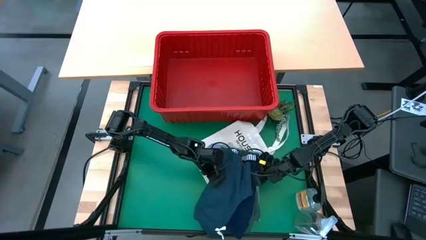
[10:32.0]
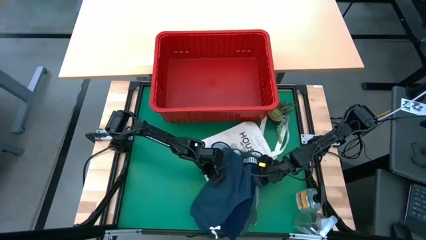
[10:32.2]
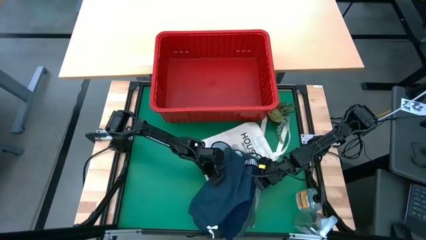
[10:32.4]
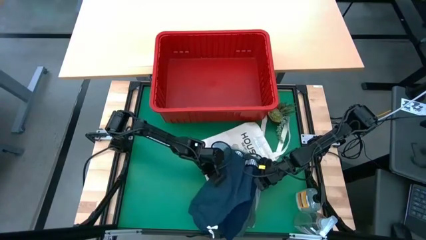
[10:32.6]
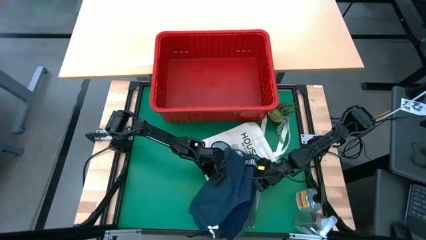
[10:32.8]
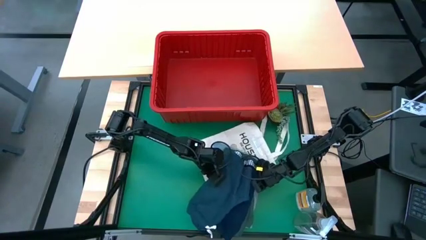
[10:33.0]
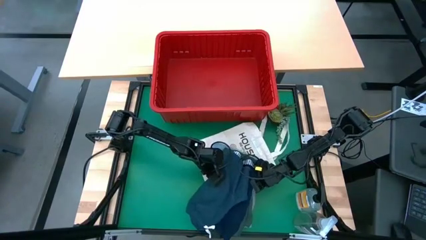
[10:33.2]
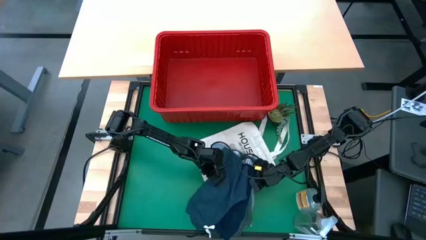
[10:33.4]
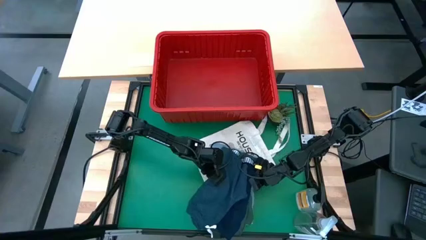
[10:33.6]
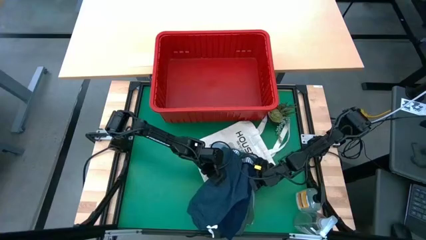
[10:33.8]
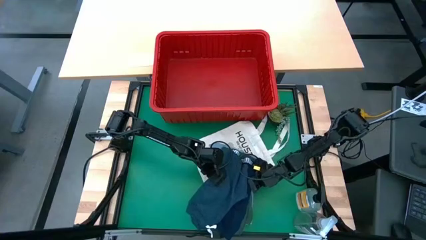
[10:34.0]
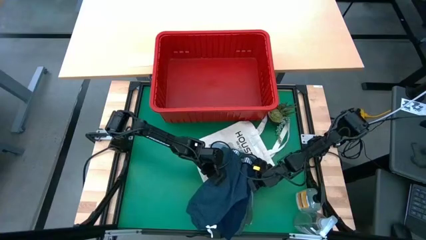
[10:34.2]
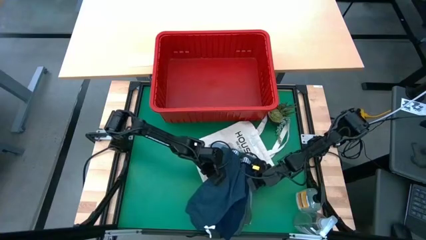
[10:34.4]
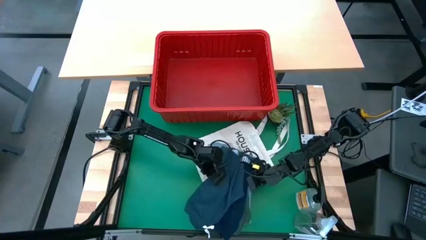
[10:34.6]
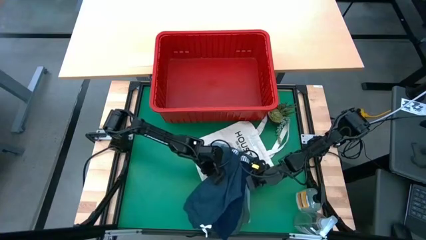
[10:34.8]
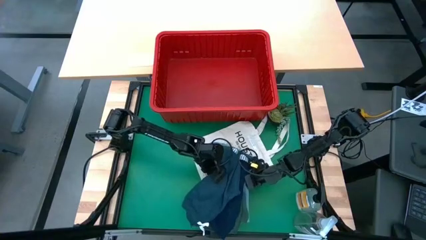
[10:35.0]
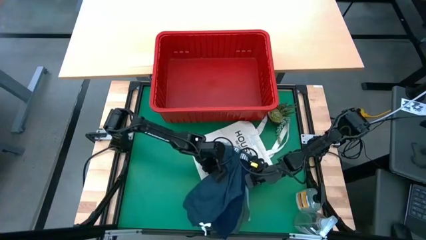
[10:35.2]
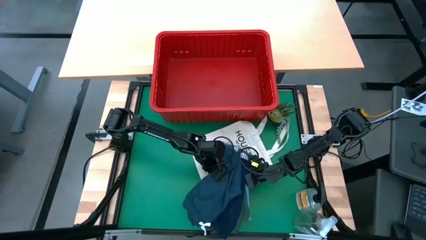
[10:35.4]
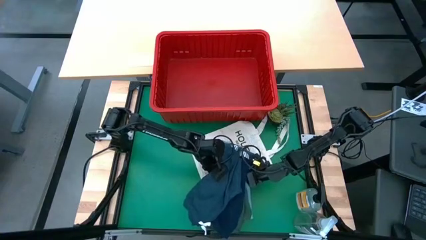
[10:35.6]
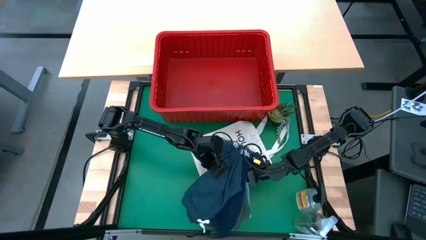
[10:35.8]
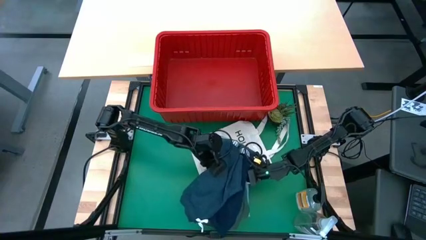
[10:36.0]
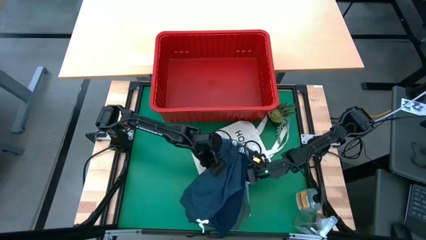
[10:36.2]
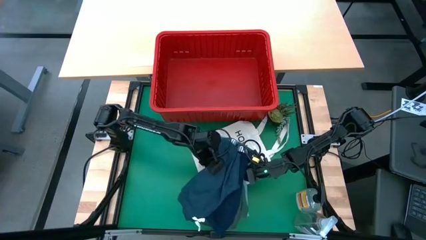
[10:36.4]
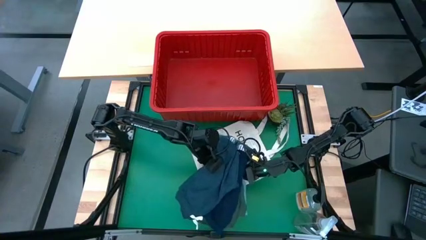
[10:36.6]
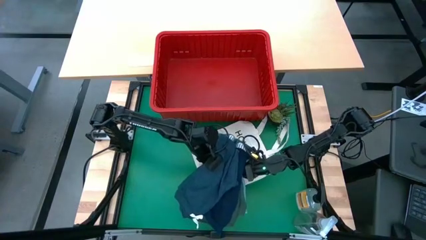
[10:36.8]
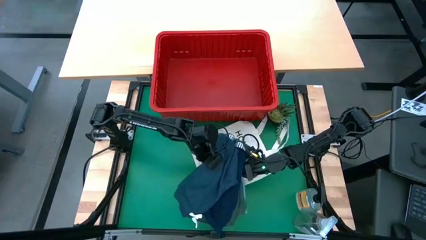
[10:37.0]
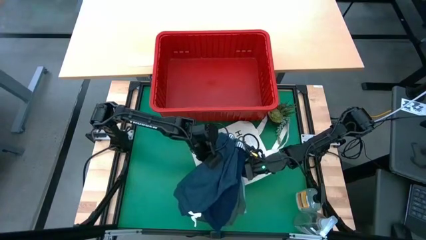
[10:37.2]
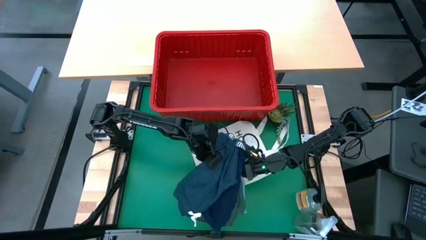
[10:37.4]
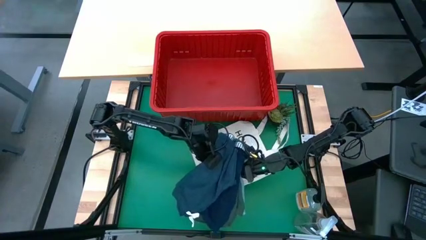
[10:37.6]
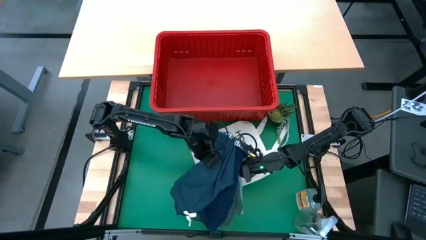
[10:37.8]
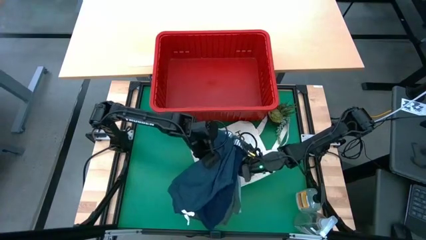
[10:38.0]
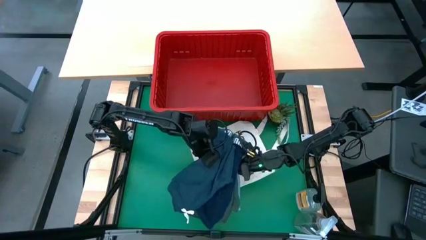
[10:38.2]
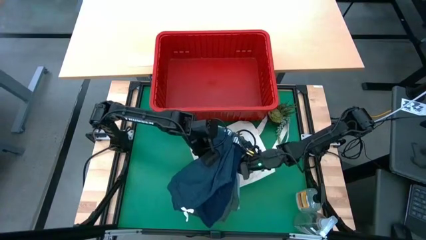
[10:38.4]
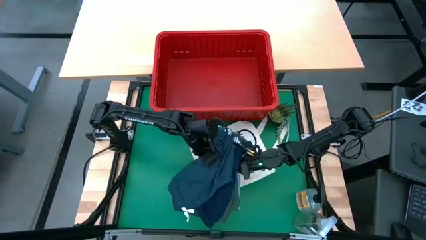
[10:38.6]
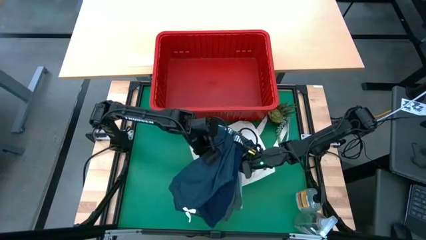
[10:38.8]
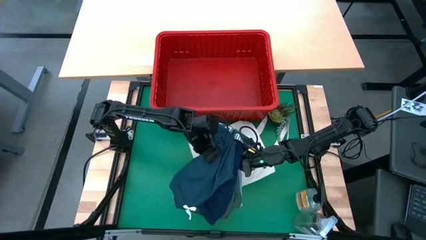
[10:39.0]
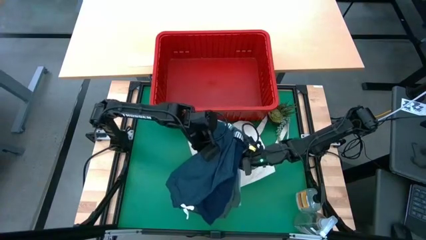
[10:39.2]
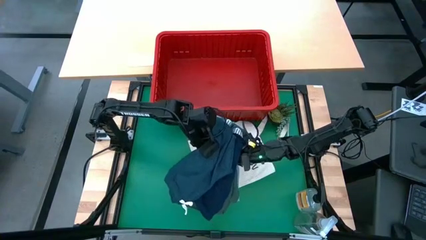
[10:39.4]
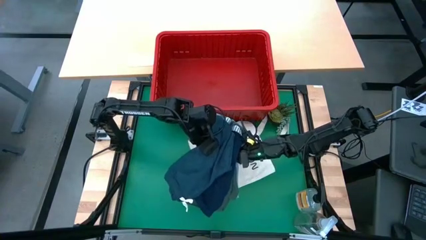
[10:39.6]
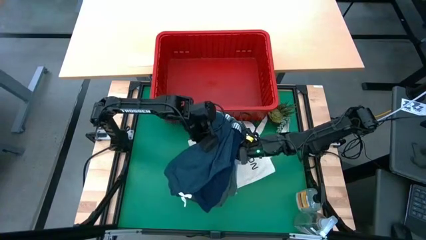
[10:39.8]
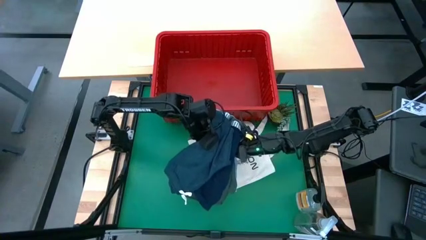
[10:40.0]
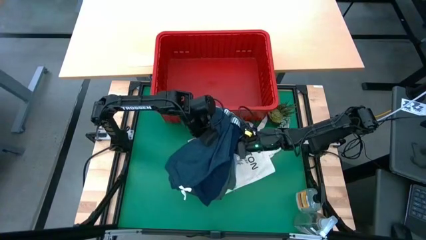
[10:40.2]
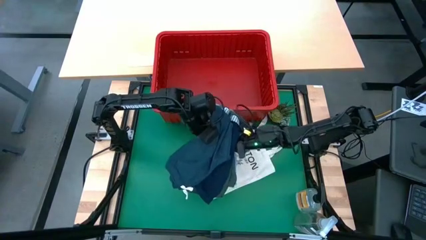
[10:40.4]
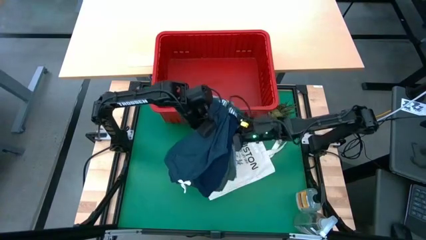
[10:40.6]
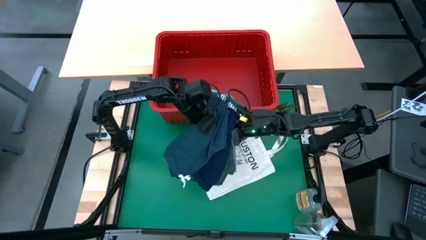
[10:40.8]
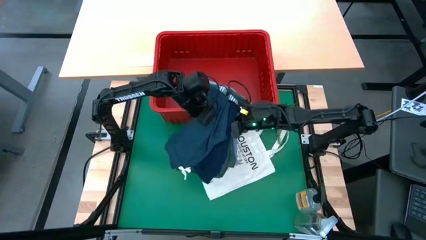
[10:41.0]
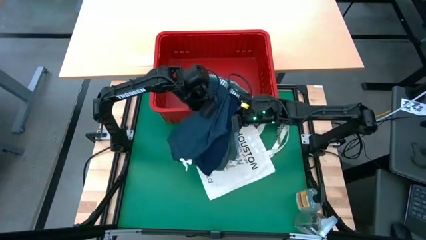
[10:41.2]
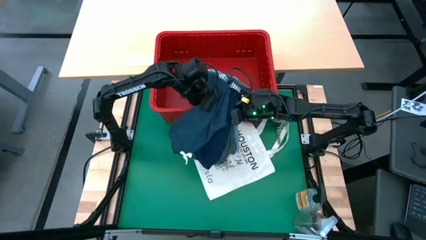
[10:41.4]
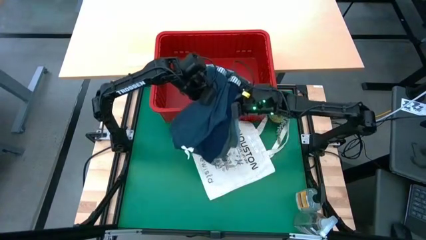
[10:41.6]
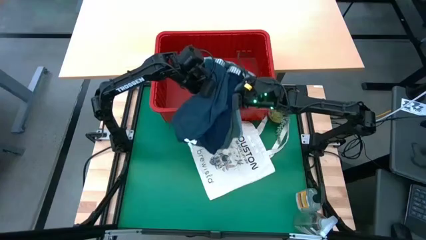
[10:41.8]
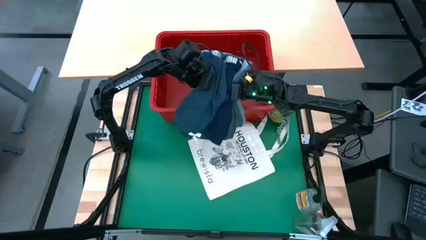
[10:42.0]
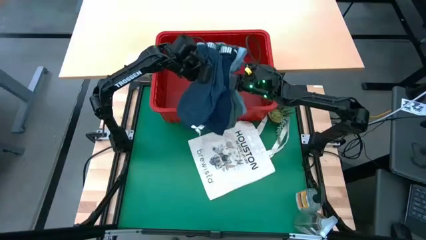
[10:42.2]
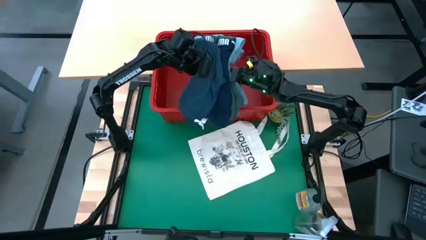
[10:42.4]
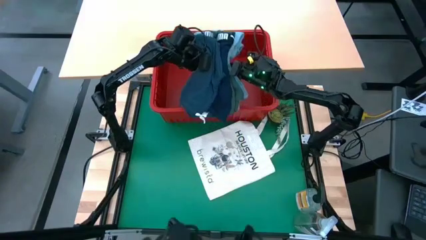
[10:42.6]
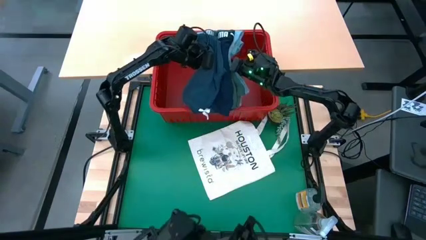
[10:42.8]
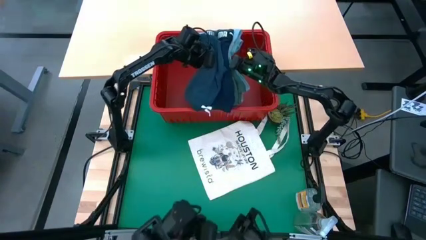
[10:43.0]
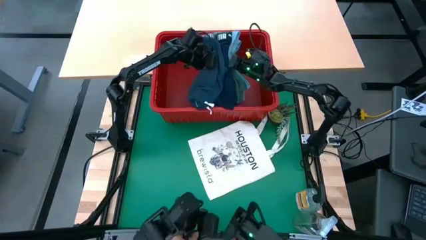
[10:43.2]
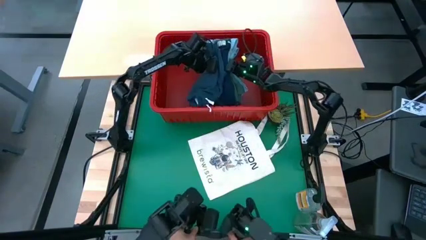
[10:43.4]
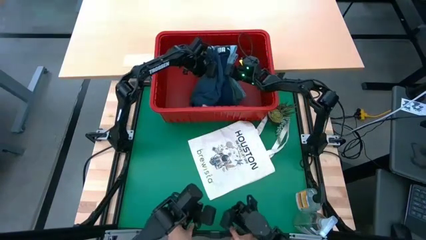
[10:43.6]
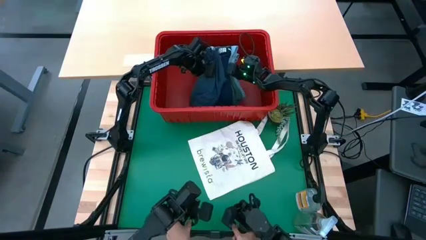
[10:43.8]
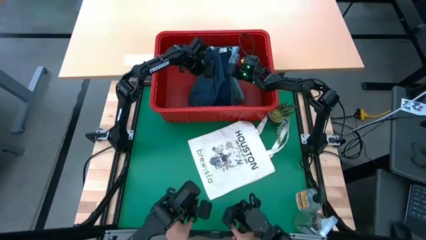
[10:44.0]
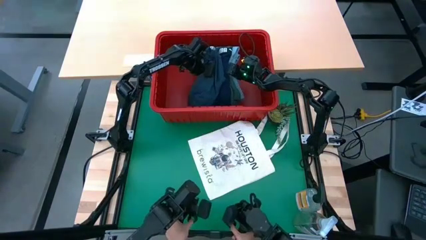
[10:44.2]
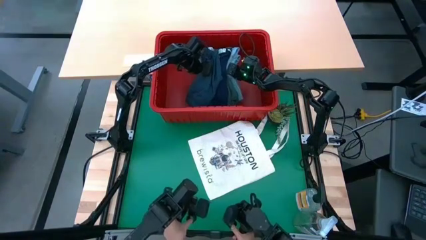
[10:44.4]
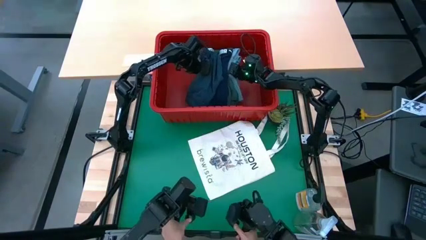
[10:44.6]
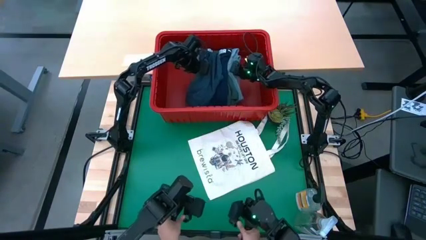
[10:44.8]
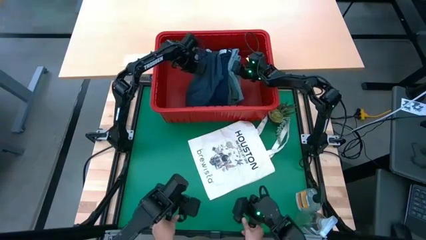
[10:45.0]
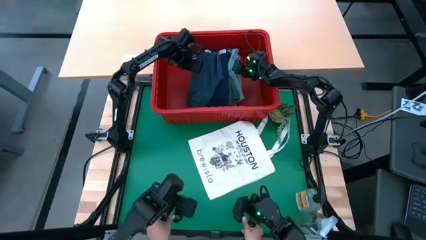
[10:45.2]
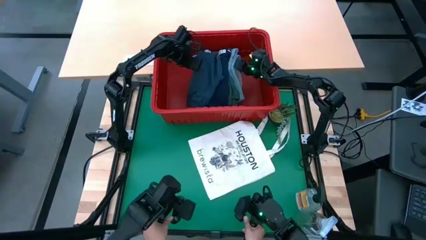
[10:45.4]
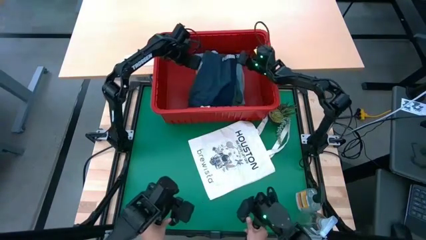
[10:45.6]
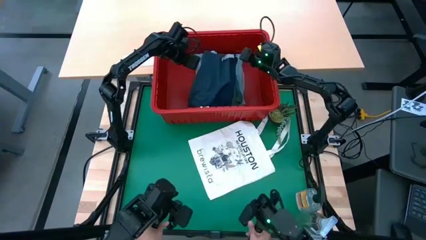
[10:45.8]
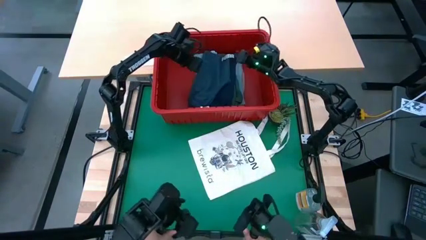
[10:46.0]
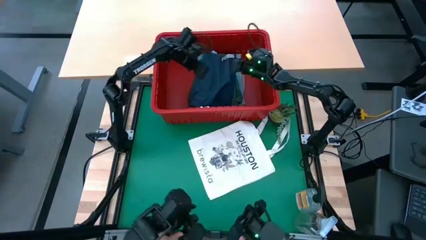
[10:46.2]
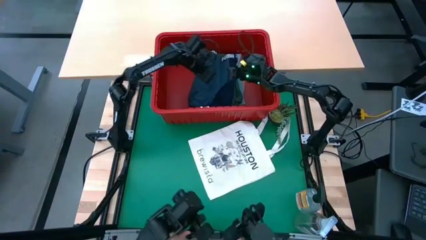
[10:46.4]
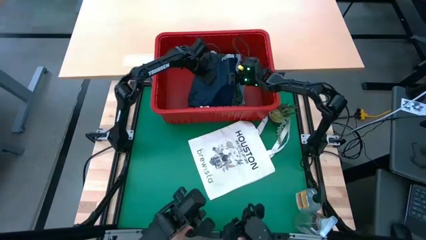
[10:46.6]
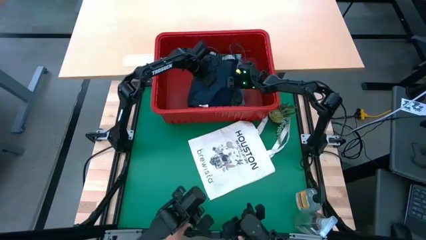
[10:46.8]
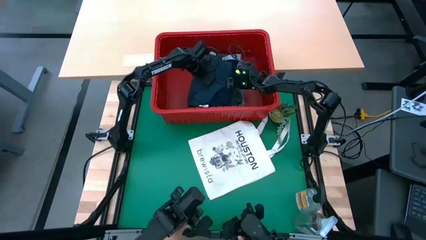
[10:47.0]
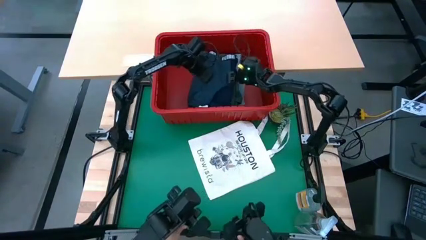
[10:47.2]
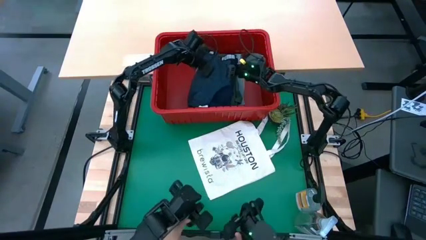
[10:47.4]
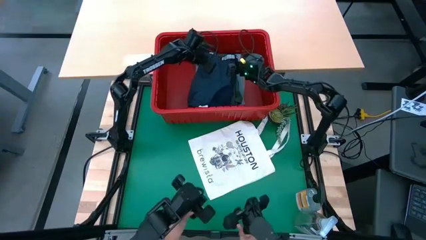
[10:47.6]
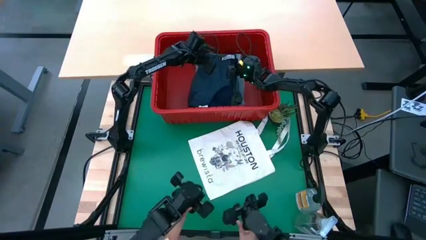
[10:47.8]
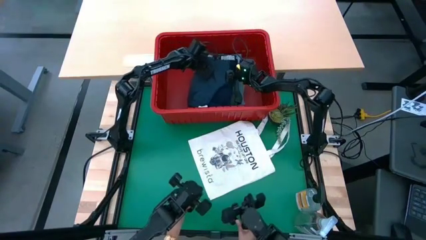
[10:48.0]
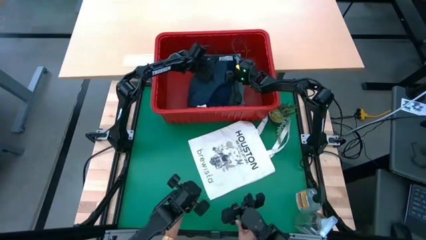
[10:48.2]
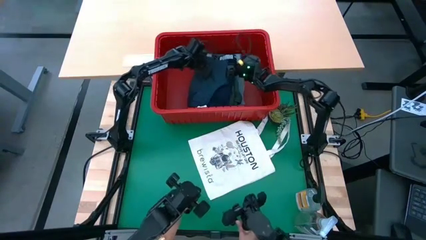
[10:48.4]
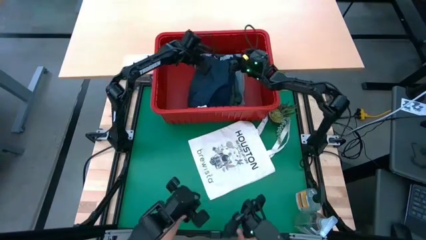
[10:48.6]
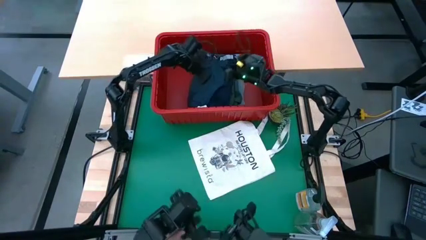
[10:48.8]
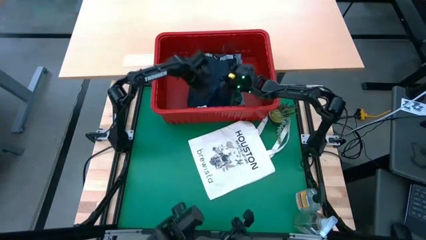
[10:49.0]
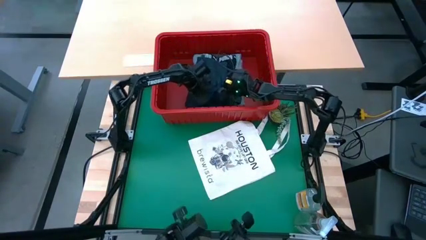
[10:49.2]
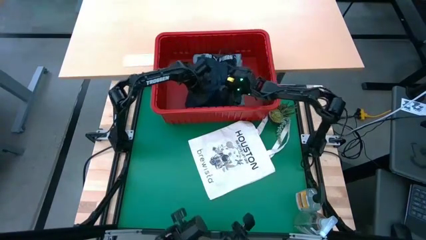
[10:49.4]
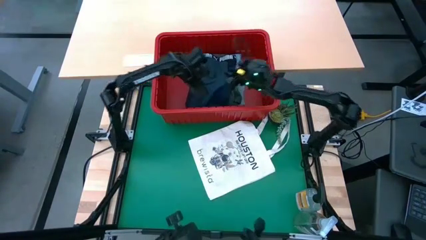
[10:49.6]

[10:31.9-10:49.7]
Task: Fold Laundry from Bin
Put the stacked clothes into the red organizer bin
